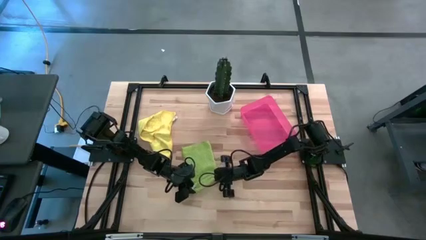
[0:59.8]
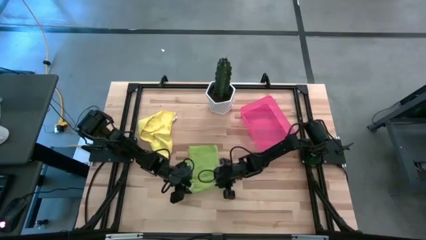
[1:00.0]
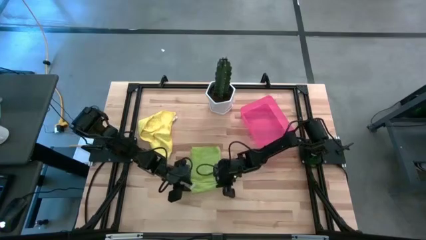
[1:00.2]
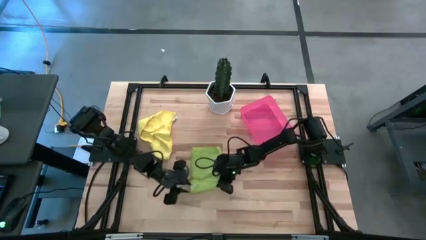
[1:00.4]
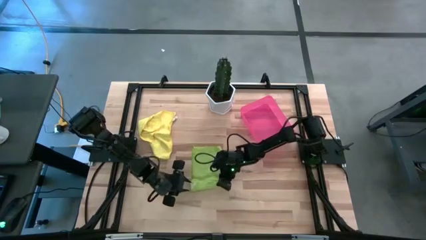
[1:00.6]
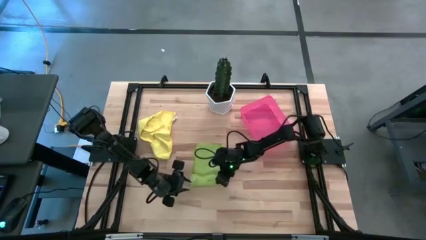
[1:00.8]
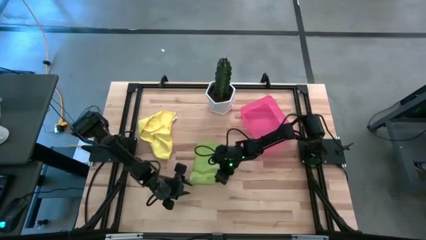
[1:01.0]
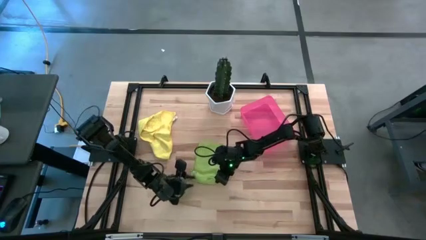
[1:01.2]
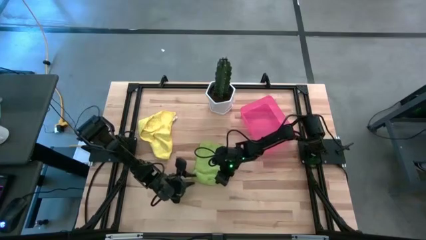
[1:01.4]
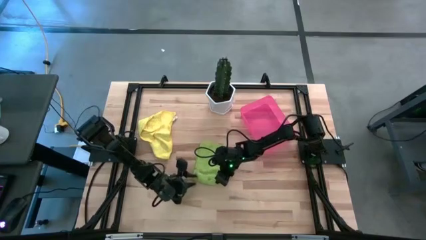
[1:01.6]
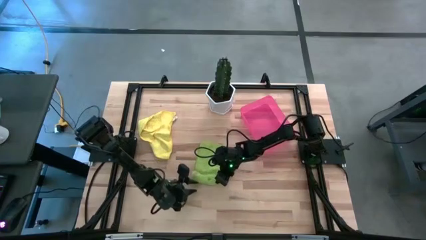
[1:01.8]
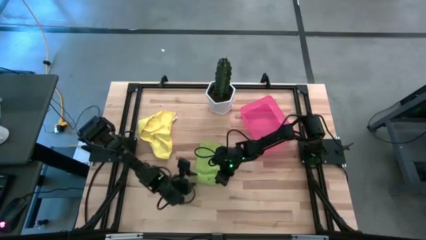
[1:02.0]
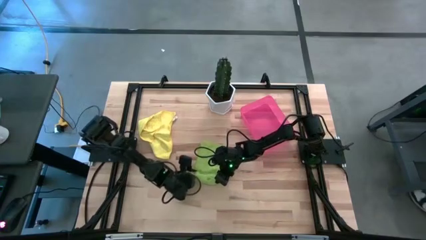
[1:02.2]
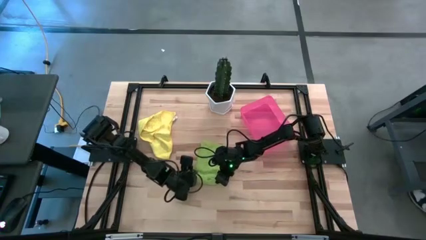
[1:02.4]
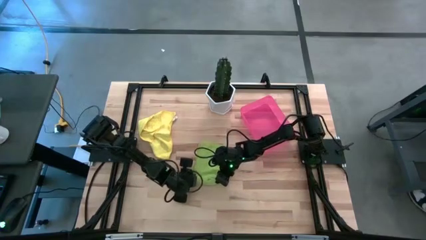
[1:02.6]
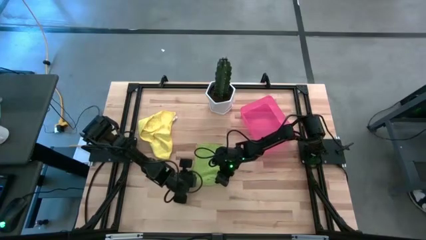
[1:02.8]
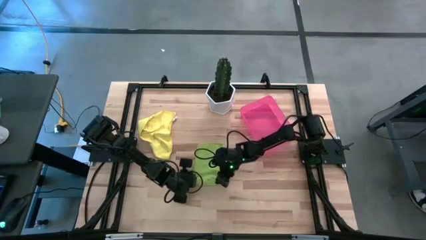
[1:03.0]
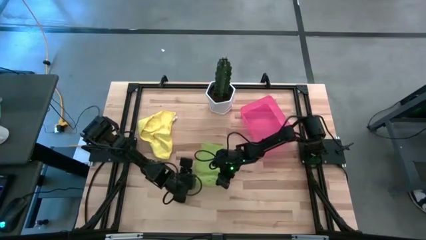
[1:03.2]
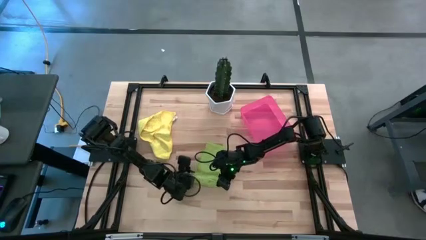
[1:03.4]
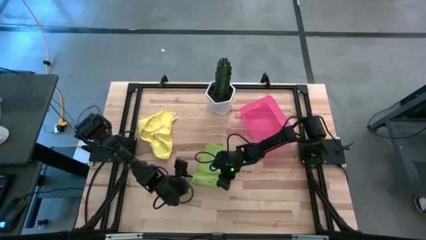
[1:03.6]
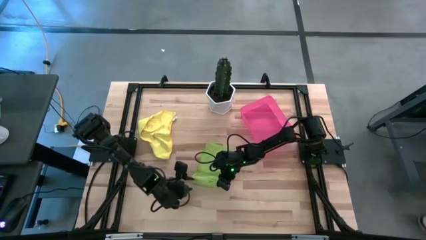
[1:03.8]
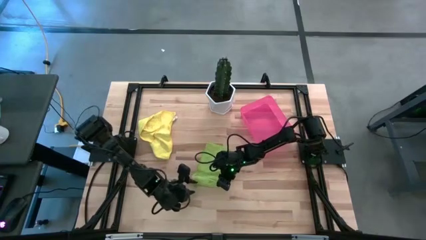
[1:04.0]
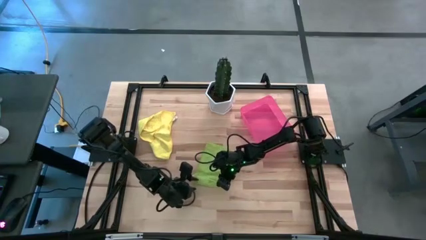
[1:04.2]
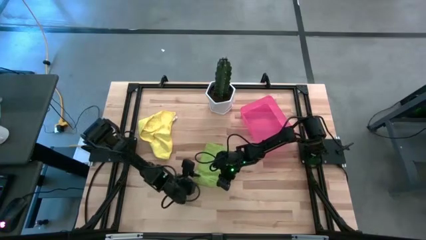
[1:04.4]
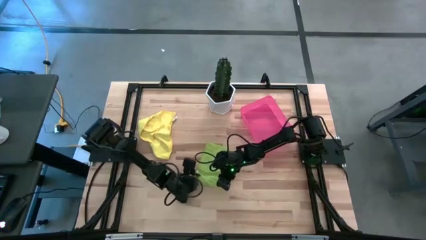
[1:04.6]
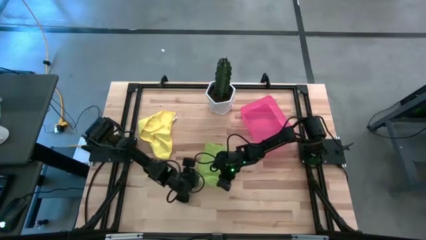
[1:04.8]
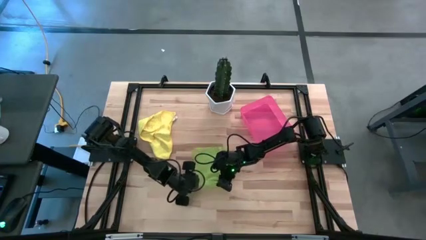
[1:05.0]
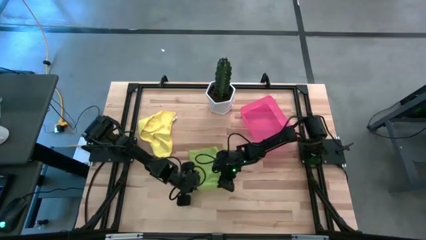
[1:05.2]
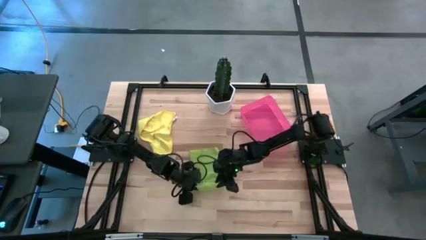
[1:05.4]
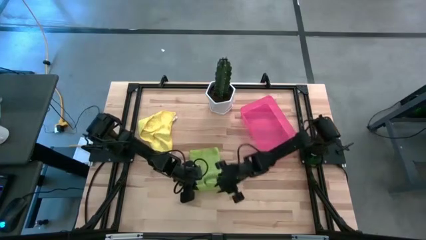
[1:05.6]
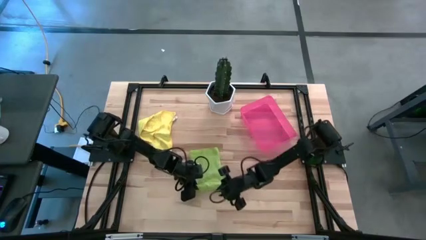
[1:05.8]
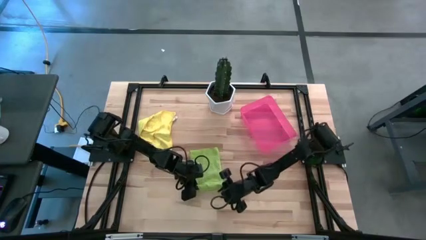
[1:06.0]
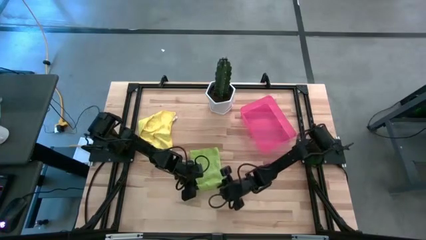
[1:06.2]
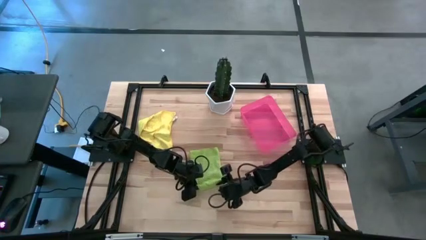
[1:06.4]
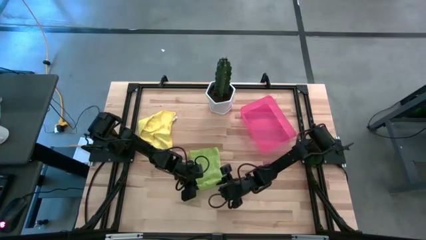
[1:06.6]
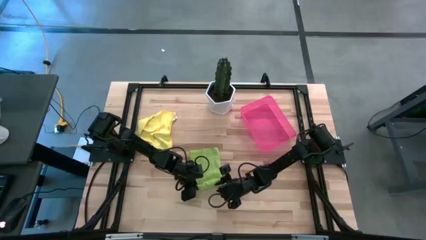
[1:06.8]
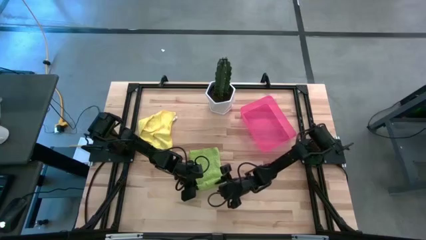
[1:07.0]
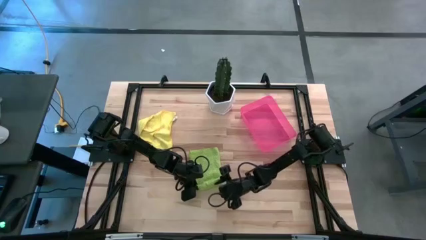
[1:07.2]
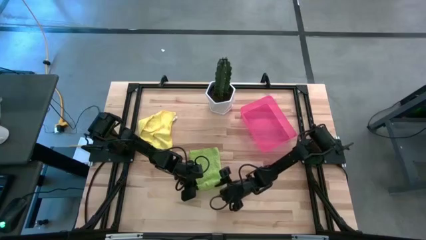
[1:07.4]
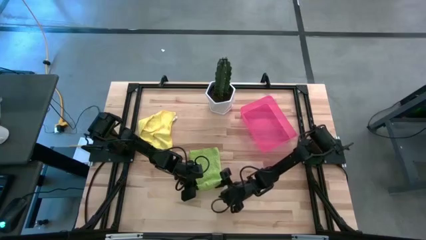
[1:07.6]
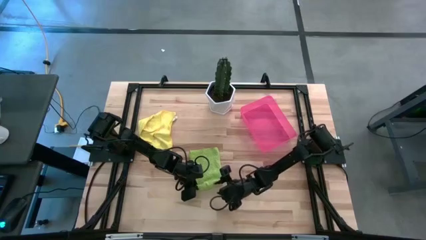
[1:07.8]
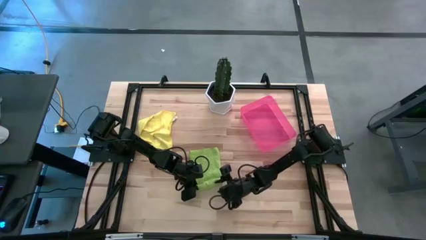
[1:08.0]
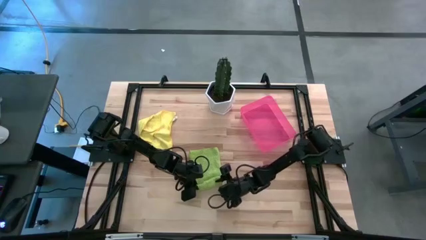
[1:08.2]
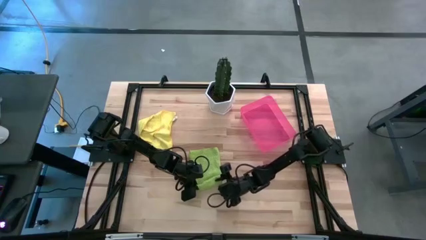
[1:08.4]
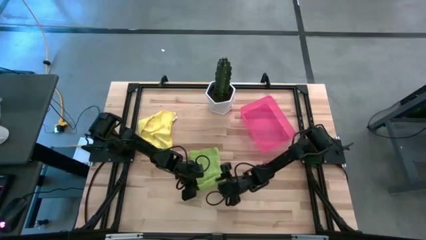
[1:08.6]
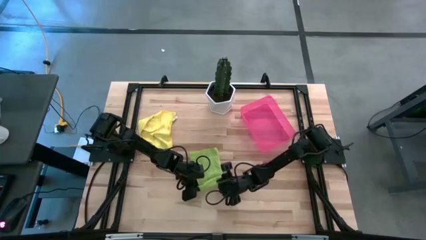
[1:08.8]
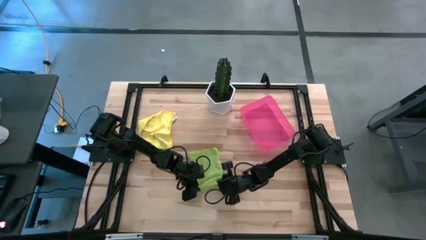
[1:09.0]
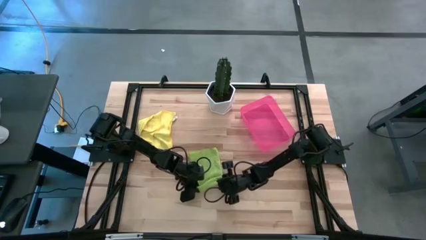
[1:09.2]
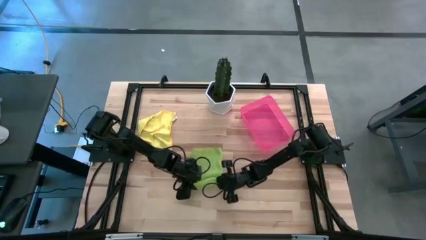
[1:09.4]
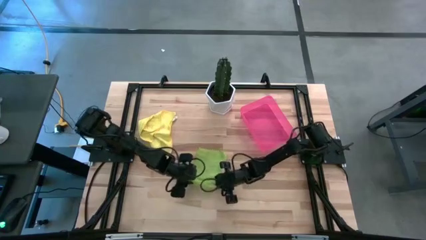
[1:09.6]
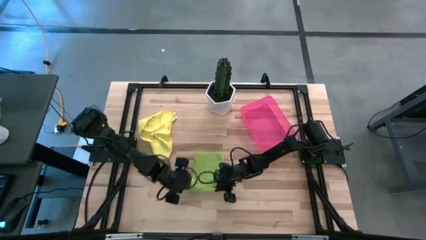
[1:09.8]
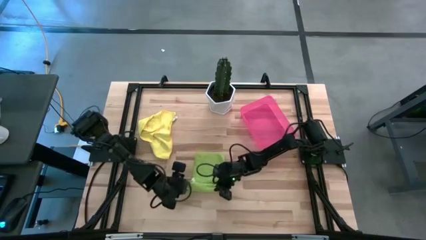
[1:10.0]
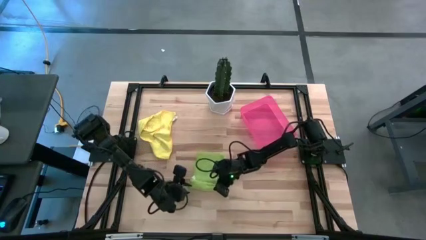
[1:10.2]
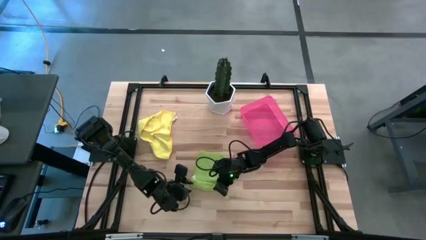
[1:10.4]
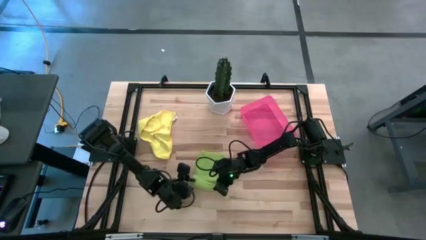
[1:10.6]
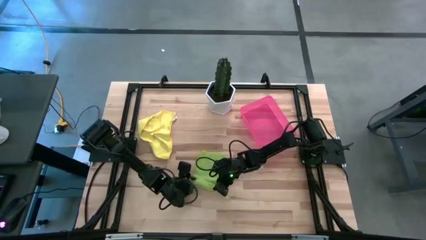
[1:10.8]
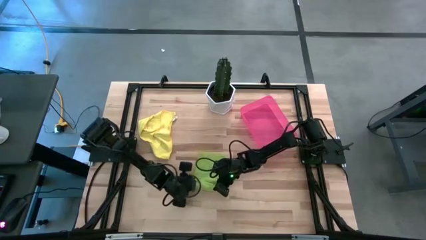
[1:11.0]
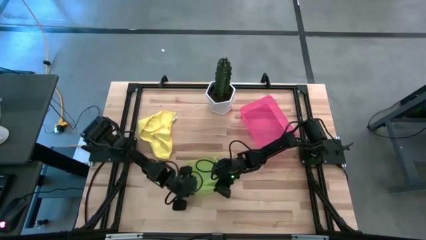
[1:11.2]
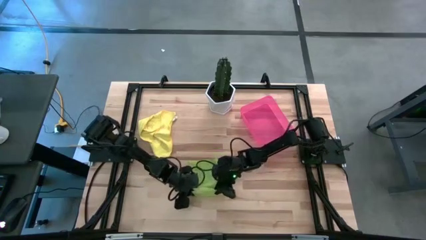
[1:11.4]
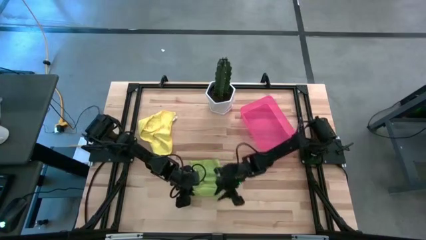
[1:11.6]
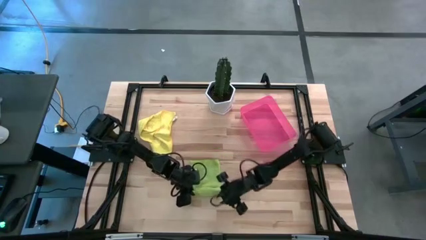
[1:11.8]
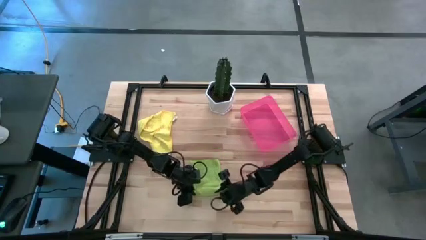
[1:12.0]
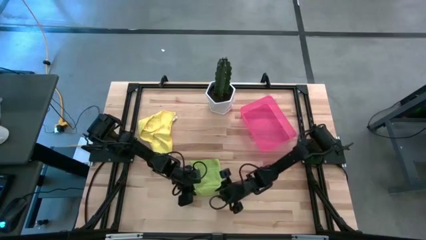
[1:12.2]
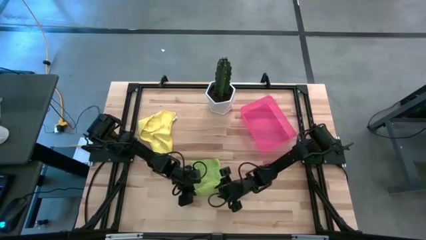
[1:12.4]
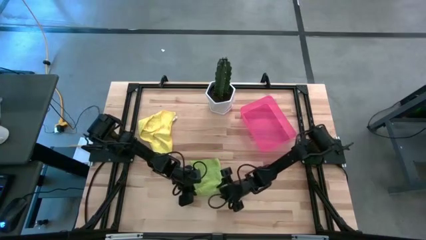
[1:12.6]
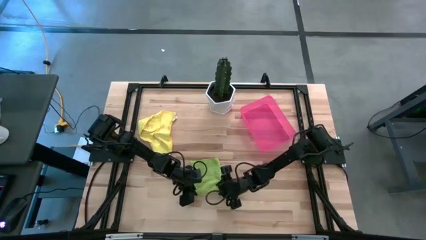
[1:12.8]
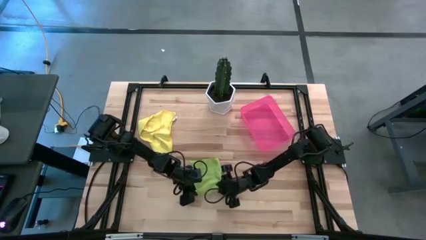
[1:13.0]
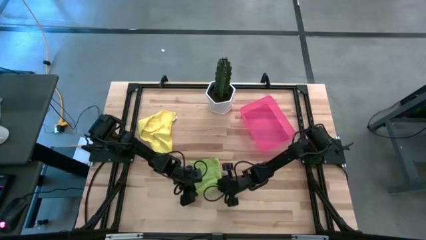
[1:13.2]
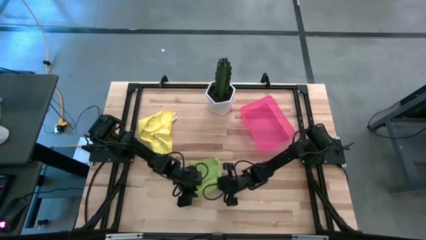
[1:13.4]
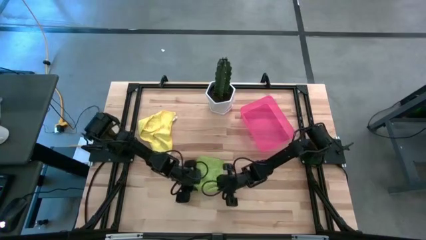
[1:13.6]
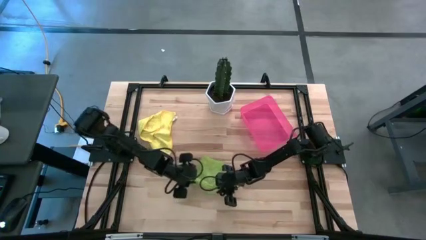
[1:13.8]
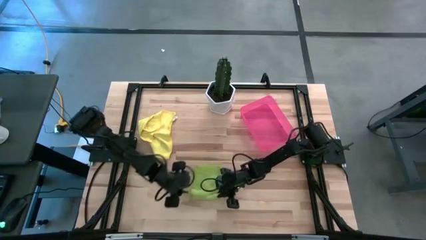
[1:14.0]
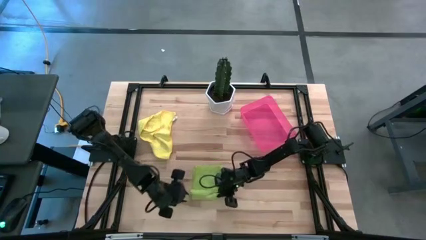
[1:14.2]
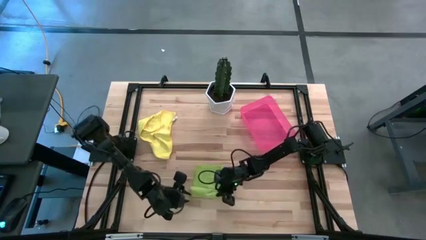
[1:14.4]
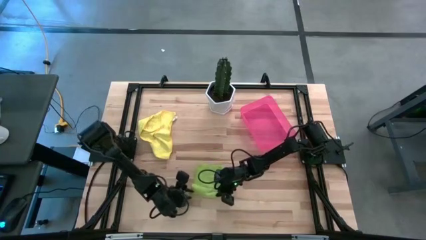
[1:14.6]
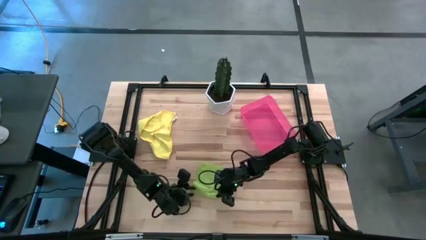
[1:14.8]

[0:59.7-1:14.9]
Task: Roll microfiber towels into tight, uniform cylinder then place into a basket
Roll the green towel
